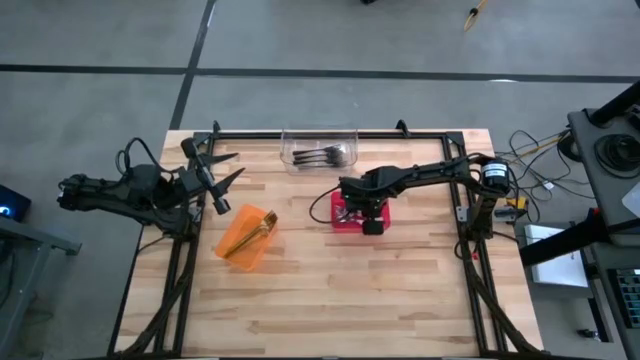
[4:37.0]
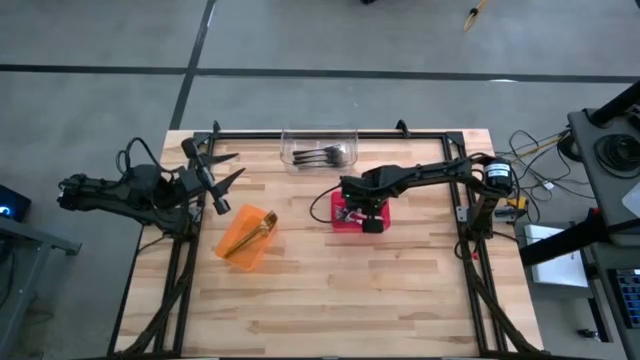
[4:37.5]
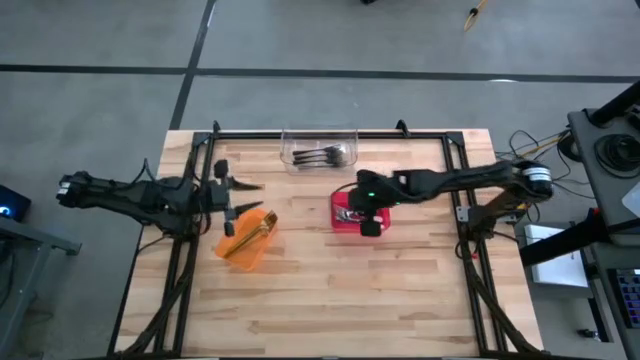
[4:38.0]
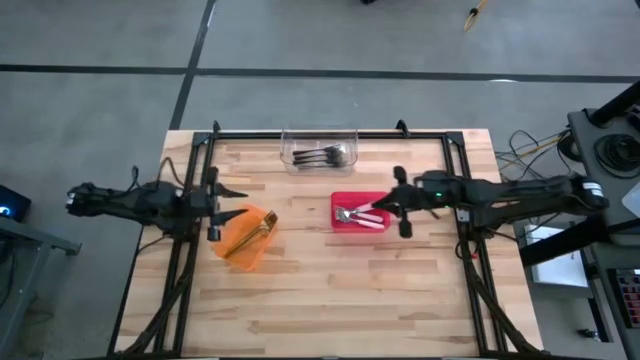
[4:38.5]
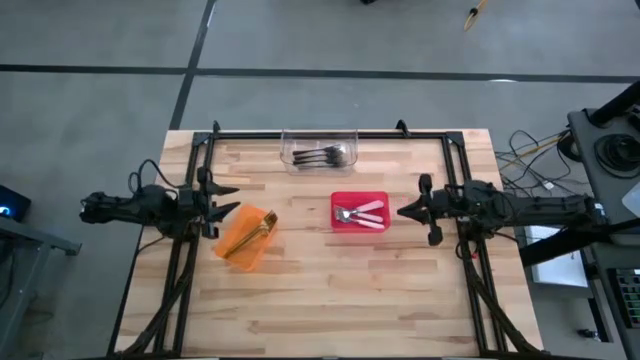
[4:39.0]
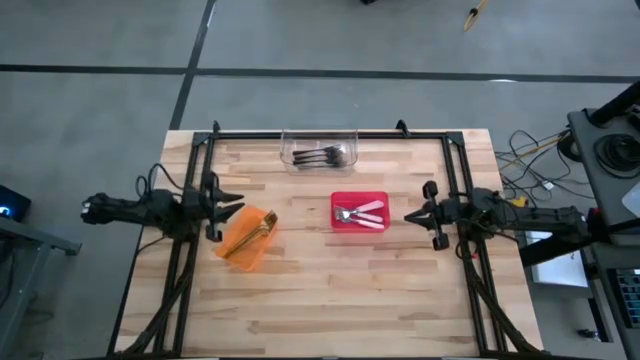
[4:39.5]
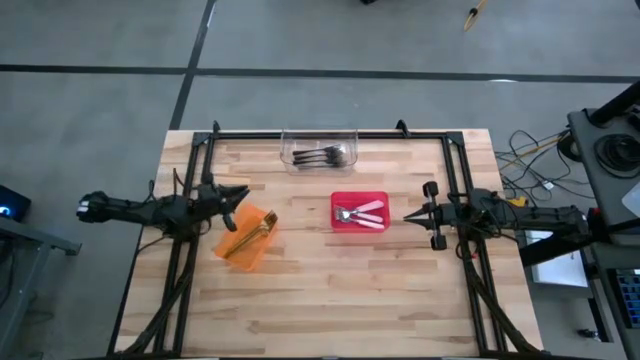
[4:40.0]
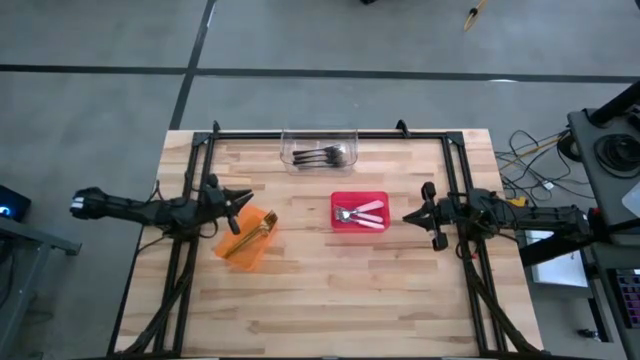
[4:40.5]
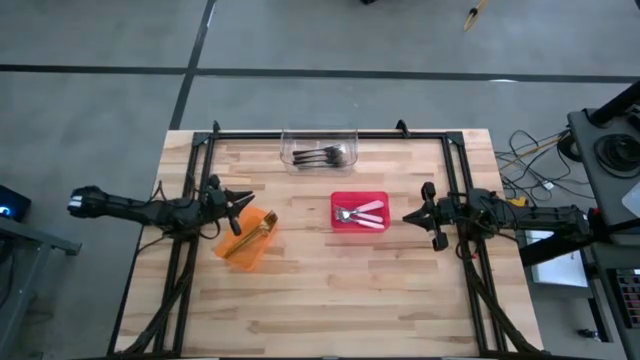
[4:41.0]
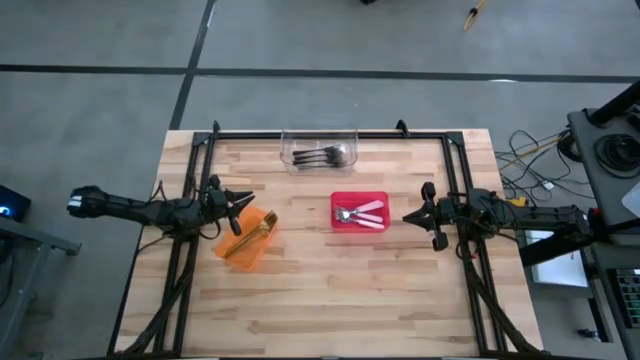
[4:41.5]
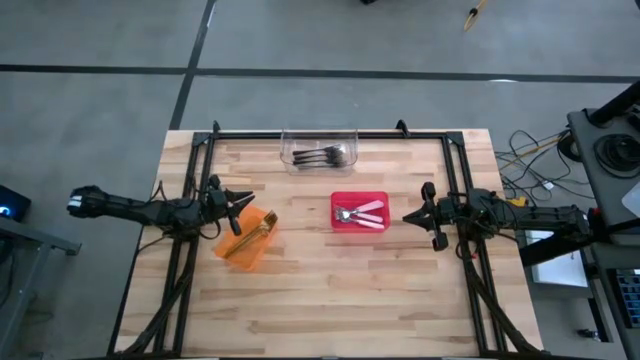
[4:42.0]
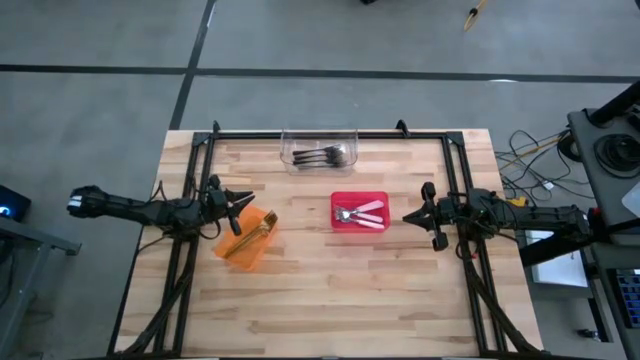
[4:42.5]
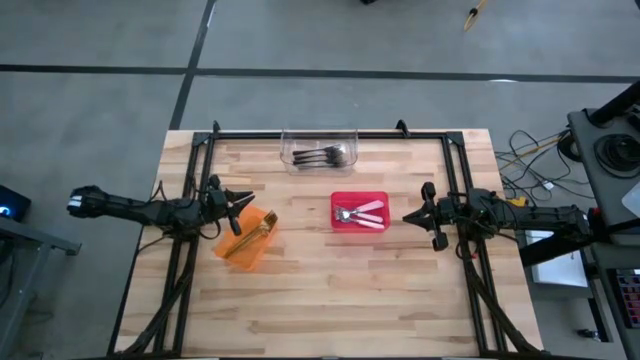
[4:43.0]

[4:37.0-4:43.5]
Task: Sort silverware by color (type)
Return to Home Position

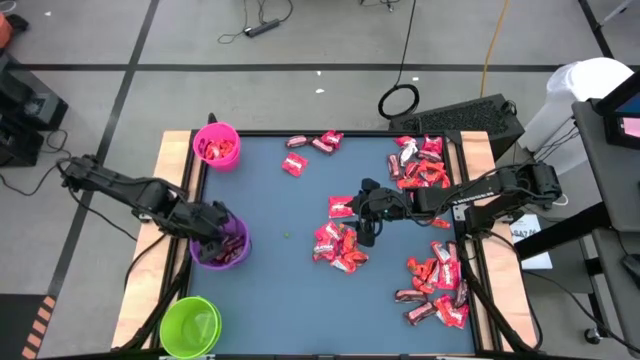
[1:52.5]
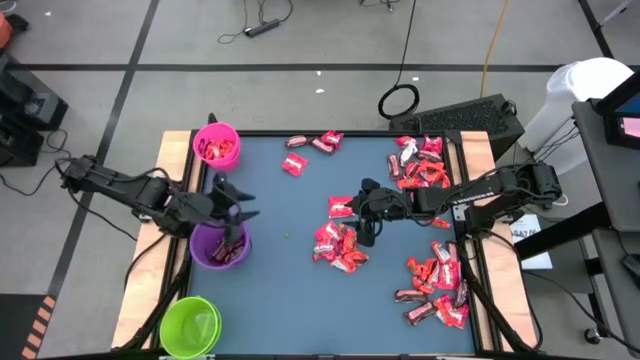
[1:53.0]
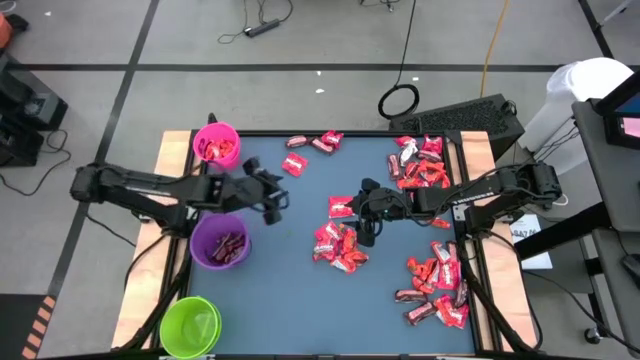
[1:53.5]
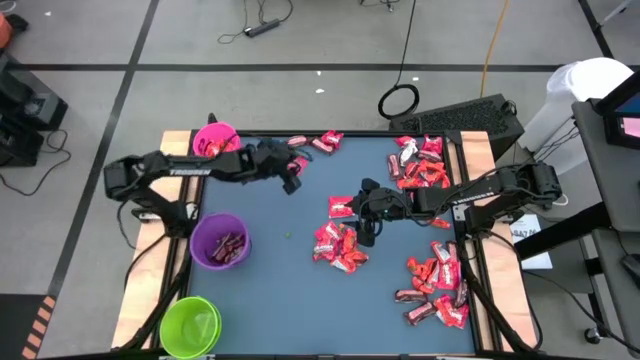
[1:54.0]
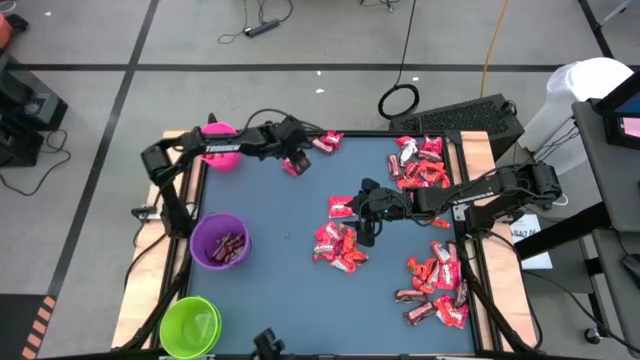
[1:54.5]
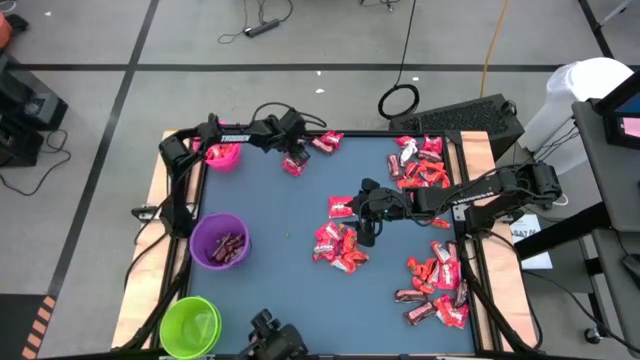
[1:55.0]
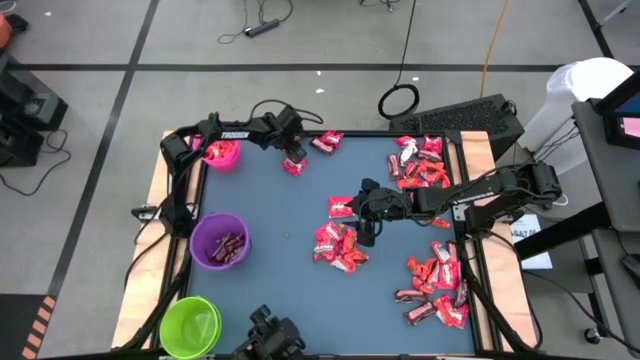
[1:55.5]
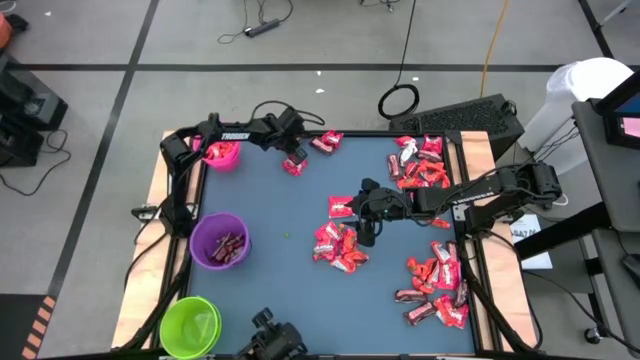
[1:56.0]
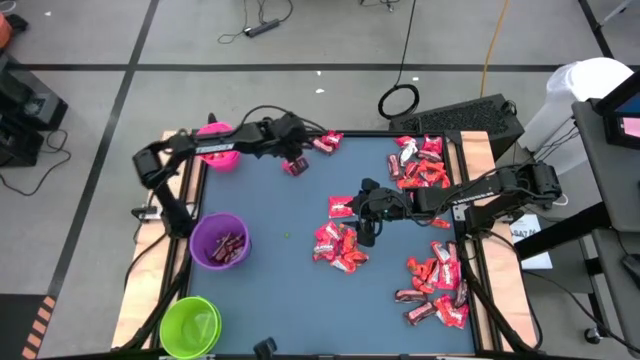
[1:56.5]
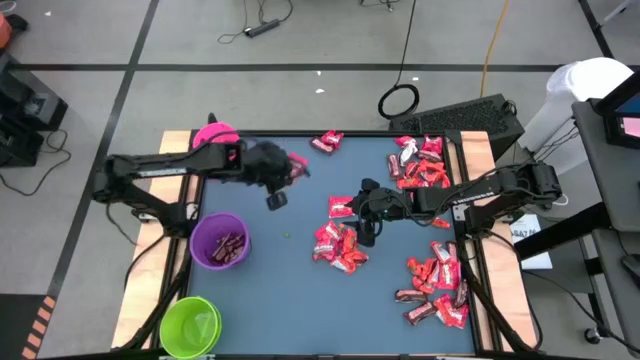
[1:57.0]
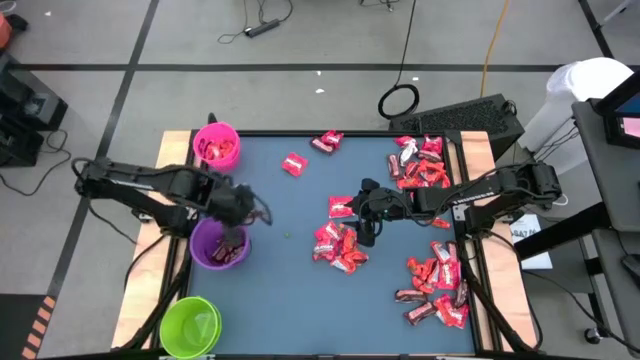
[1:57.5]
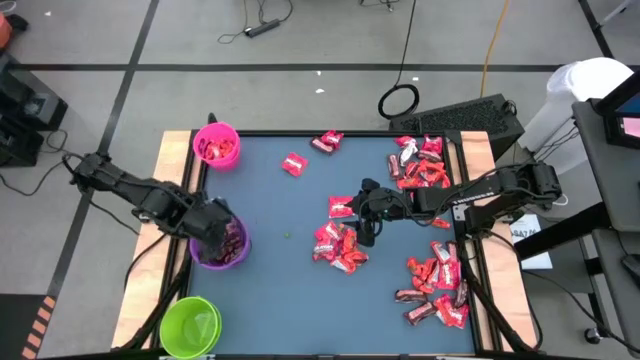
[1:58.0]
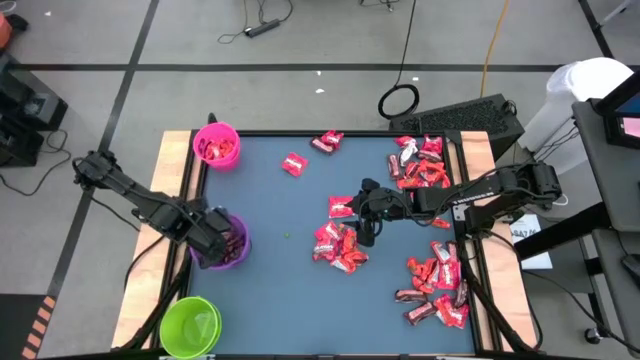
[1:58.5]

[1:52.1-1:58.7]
Task: Organize candy in baskets
Put the brown chocolate into the violet bucket

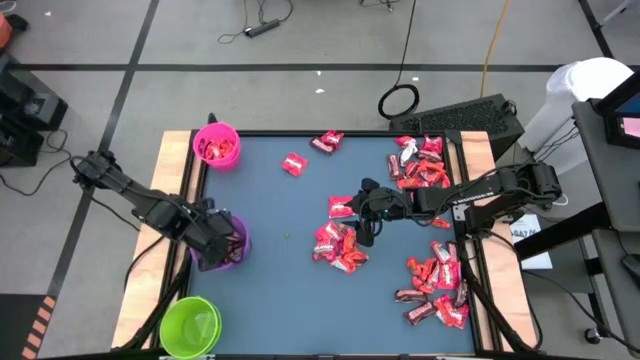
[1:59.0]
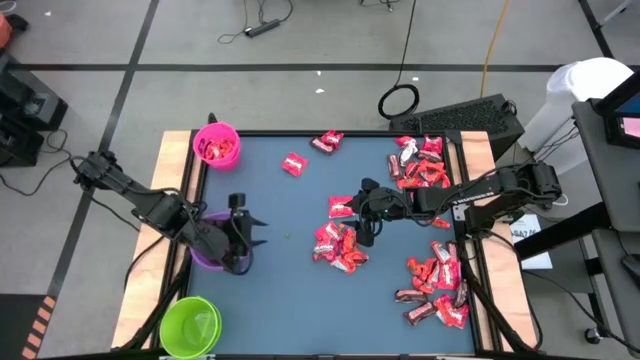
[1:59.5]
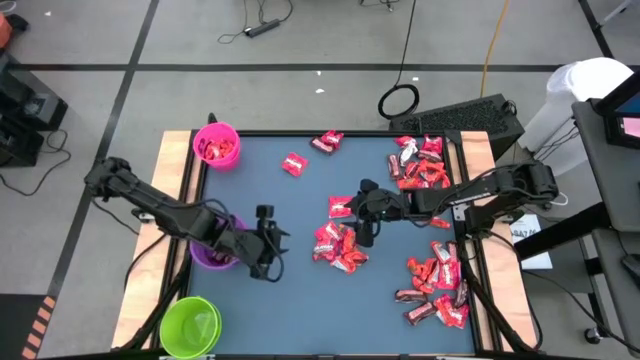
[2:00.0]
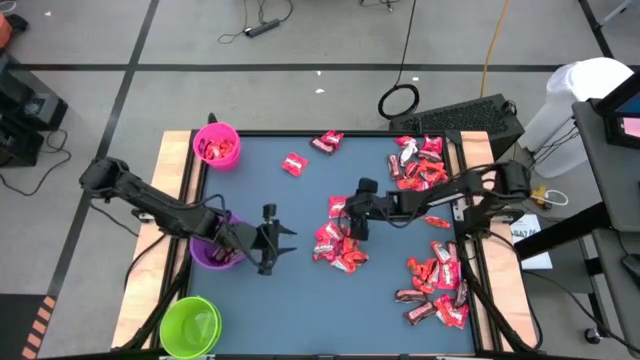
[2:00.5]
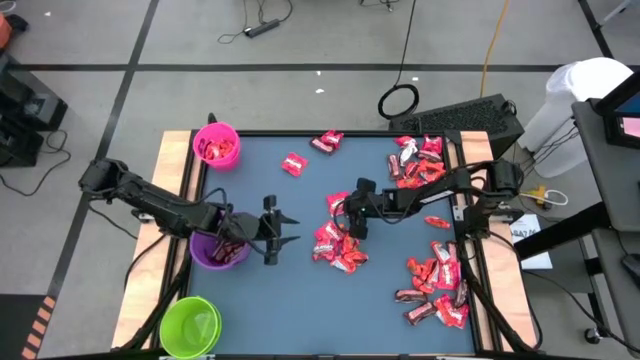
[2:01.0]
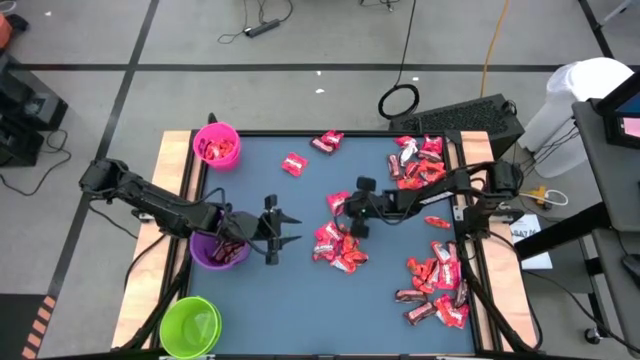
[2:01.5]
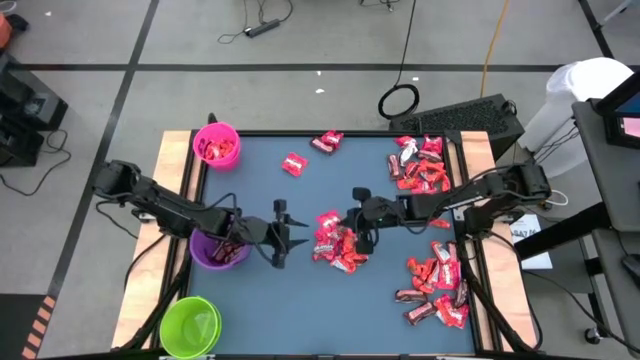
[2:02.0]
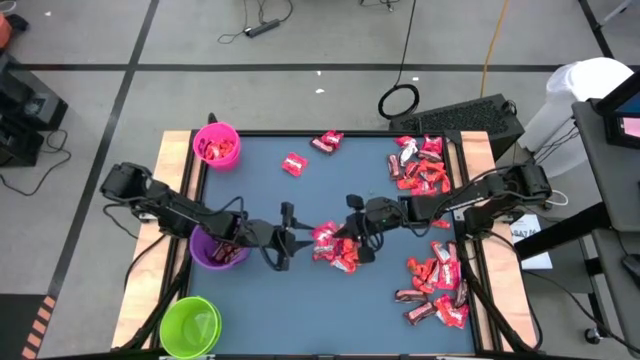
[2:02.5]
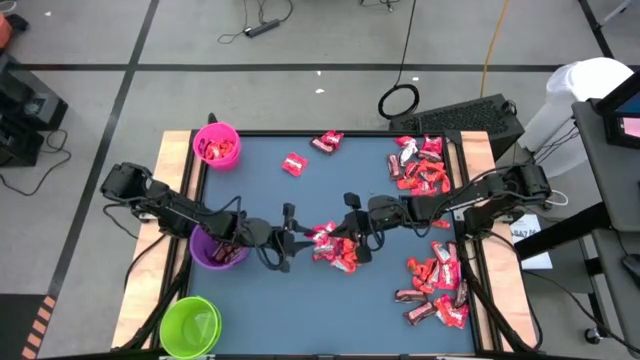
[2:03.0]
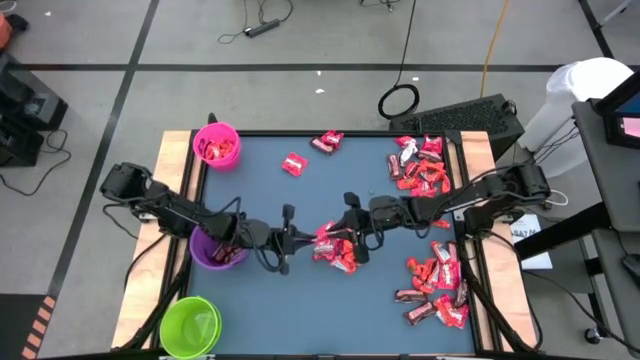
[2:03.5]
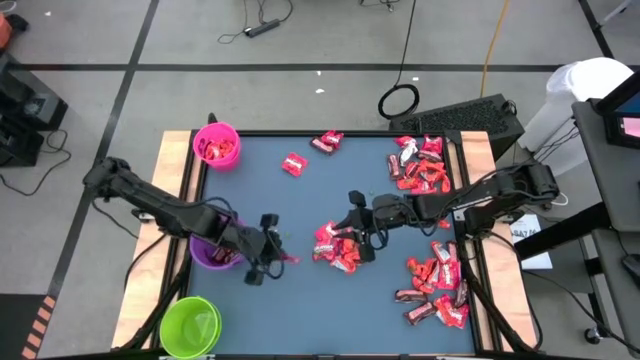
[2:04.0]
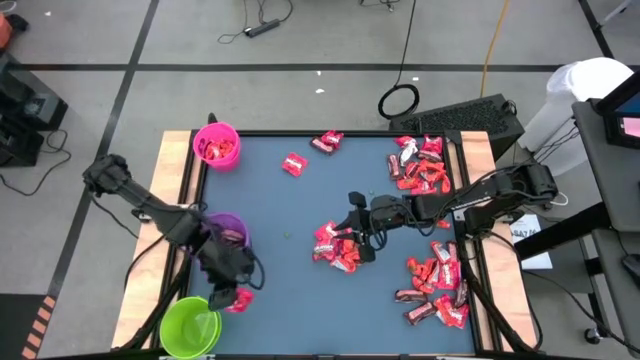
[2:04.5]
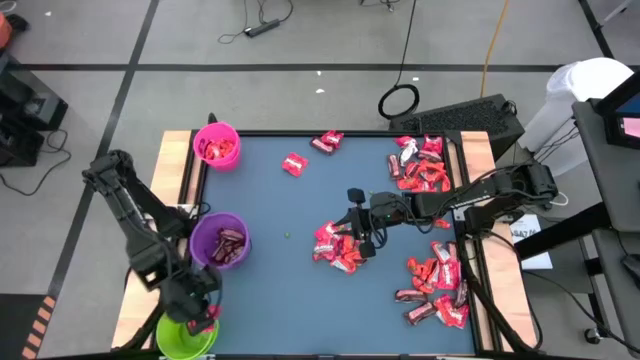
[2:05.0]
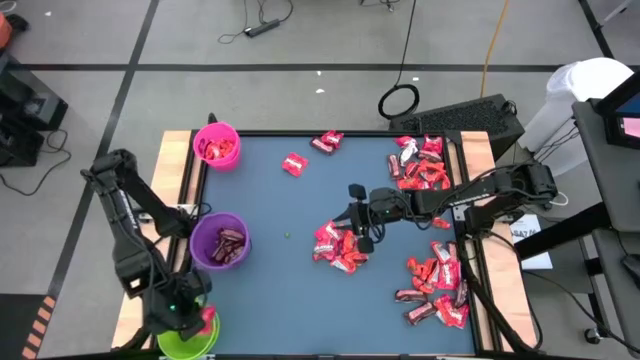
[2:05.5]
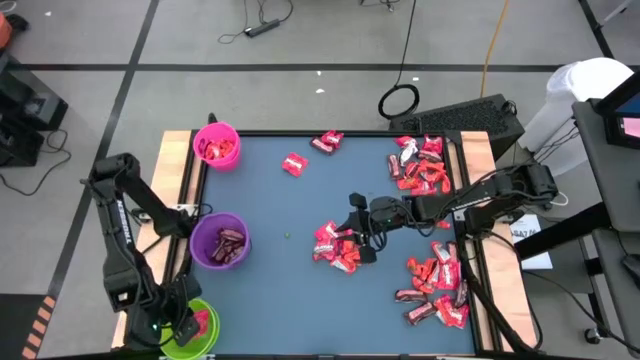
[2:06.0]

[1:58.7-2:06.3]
Put the red candy into the green bucket
